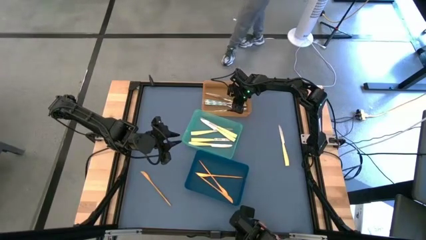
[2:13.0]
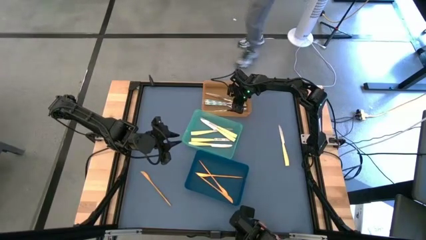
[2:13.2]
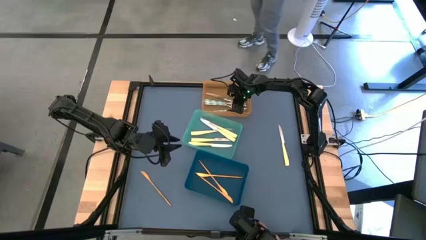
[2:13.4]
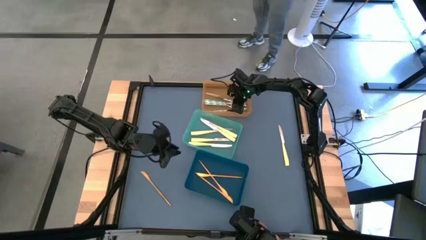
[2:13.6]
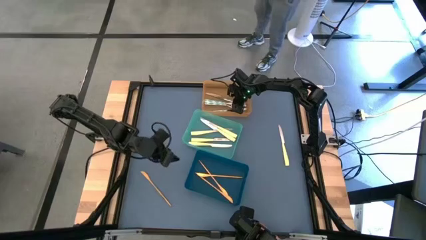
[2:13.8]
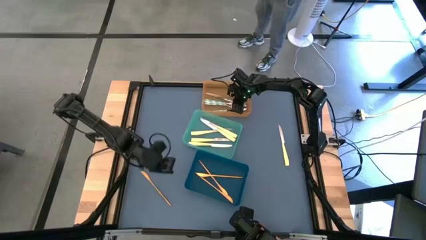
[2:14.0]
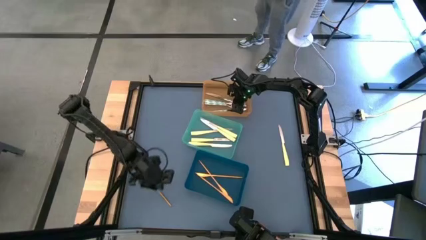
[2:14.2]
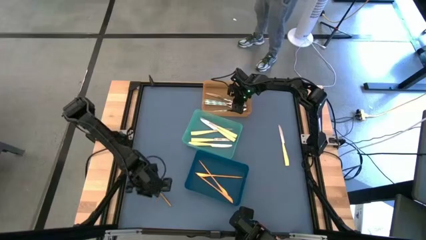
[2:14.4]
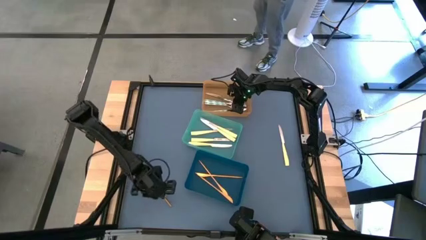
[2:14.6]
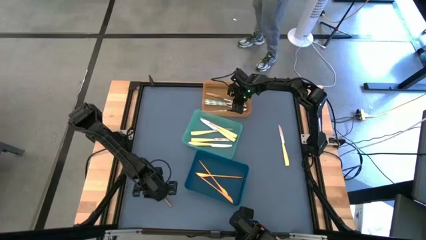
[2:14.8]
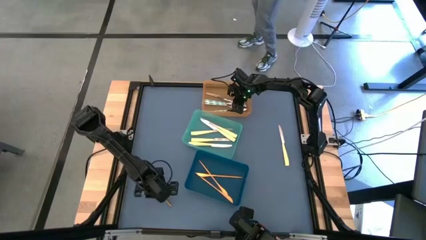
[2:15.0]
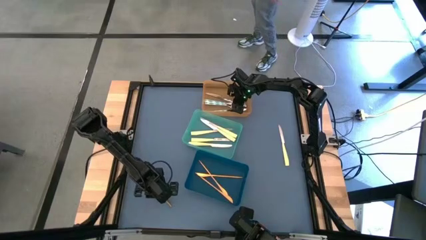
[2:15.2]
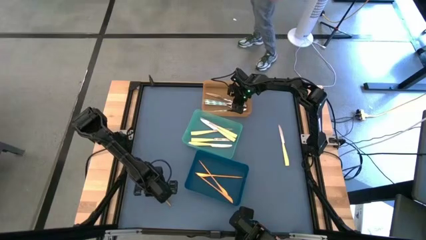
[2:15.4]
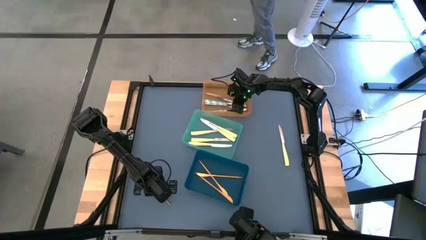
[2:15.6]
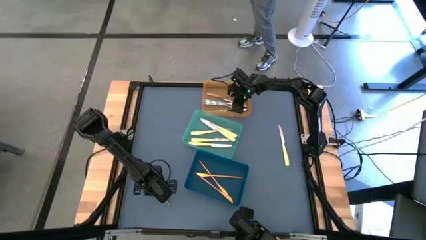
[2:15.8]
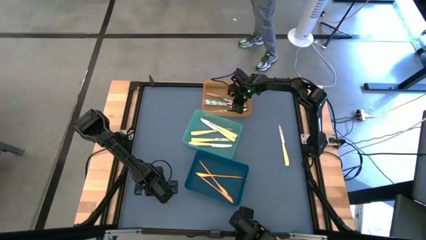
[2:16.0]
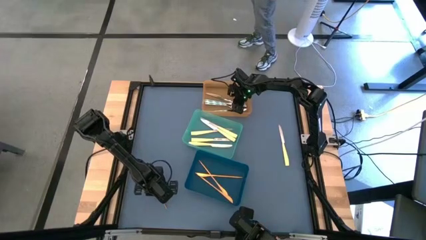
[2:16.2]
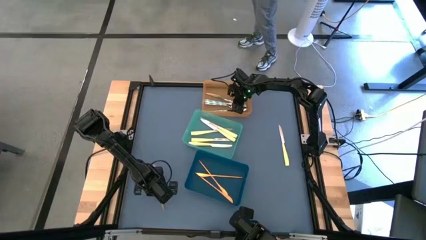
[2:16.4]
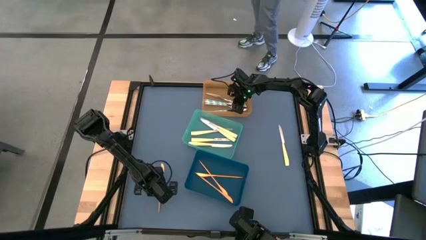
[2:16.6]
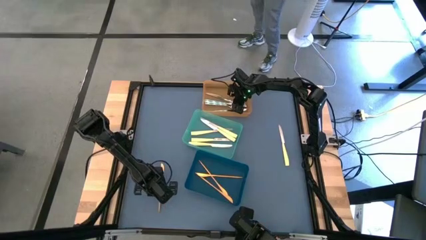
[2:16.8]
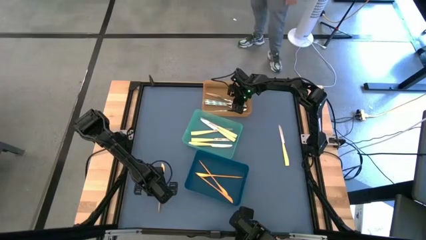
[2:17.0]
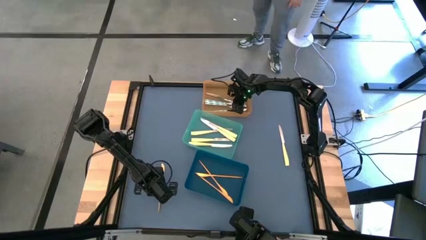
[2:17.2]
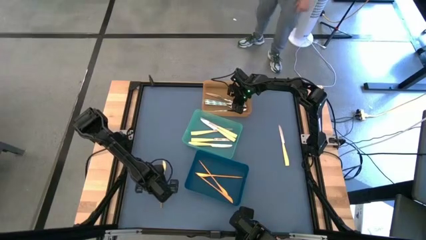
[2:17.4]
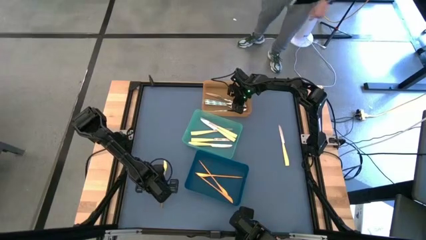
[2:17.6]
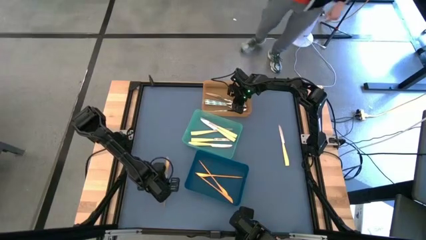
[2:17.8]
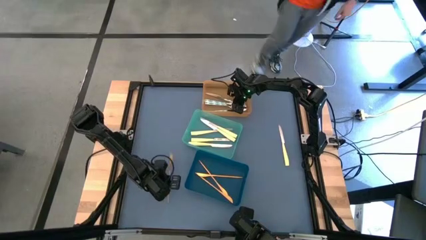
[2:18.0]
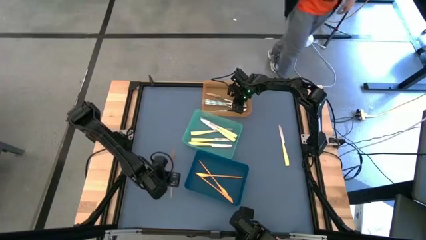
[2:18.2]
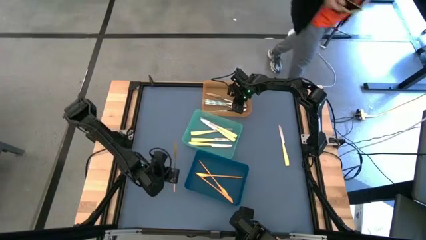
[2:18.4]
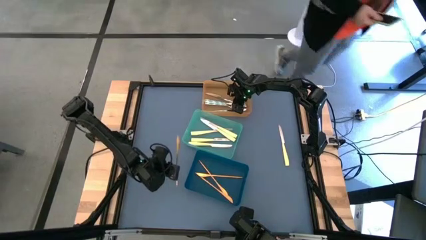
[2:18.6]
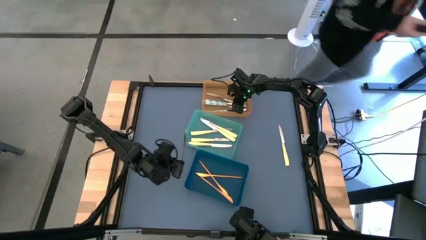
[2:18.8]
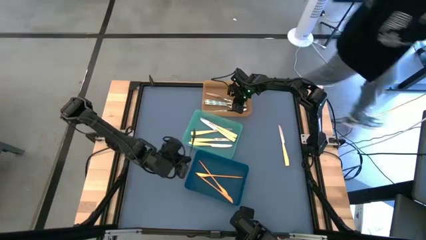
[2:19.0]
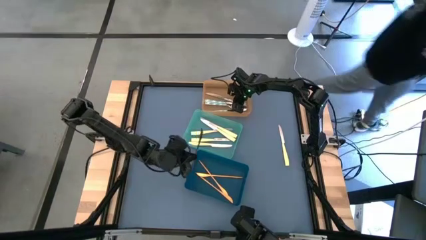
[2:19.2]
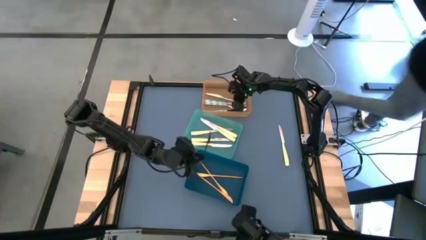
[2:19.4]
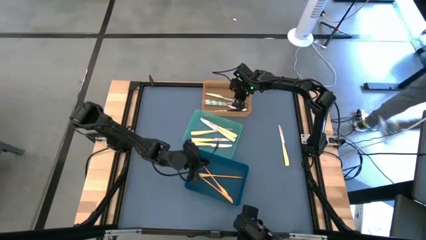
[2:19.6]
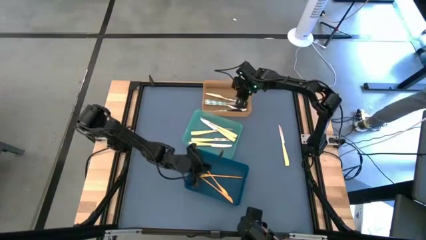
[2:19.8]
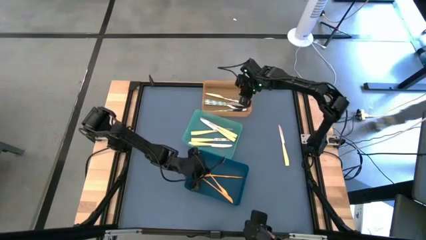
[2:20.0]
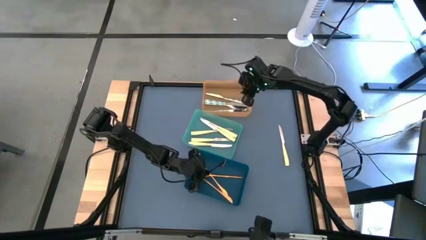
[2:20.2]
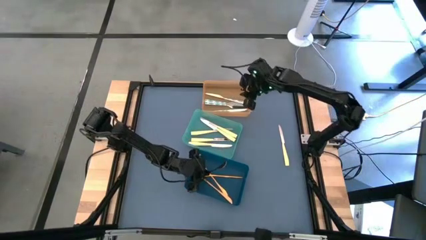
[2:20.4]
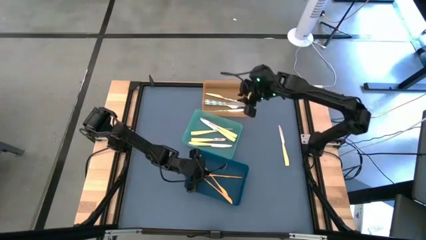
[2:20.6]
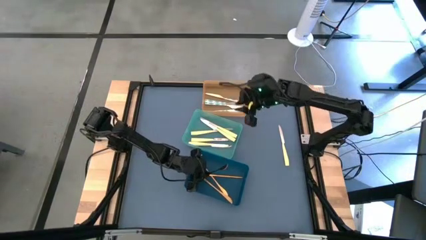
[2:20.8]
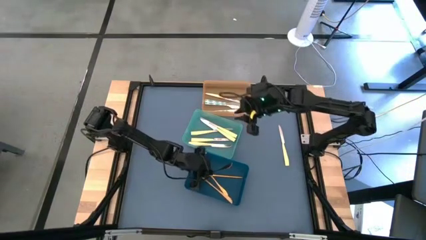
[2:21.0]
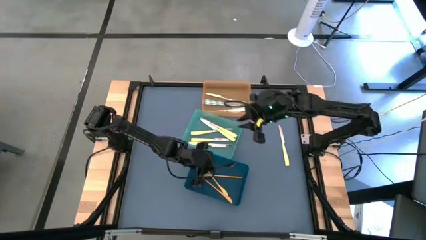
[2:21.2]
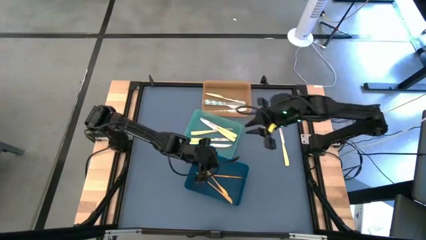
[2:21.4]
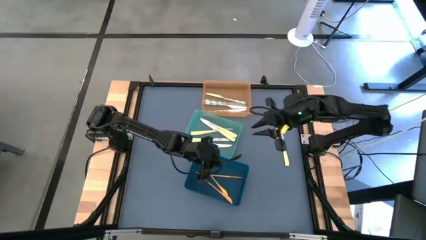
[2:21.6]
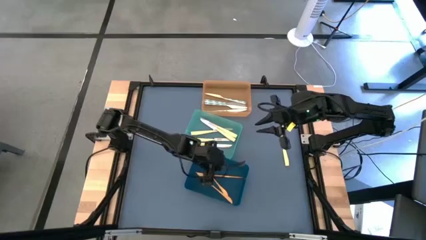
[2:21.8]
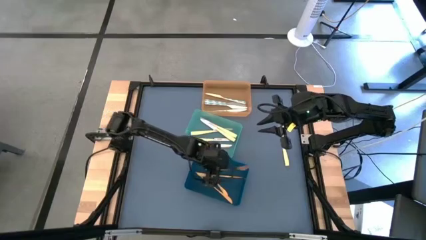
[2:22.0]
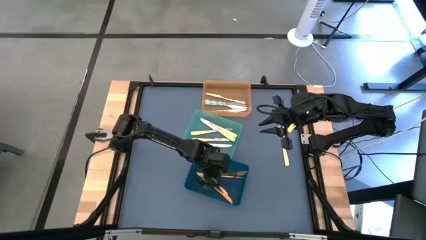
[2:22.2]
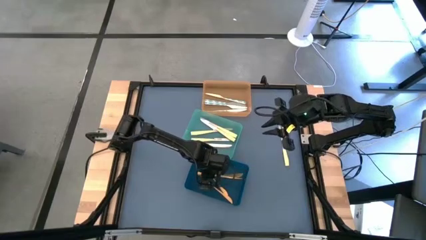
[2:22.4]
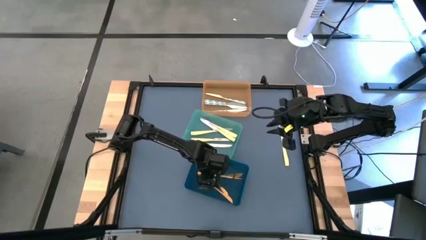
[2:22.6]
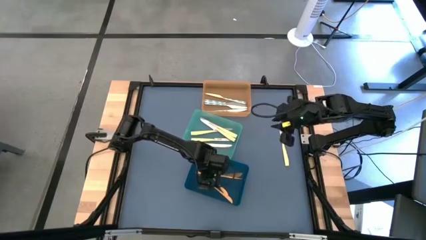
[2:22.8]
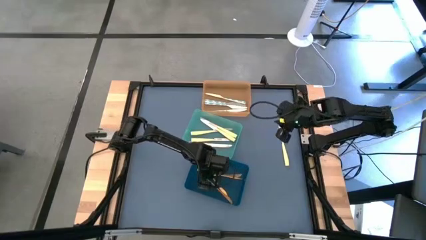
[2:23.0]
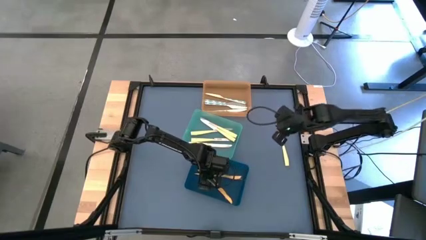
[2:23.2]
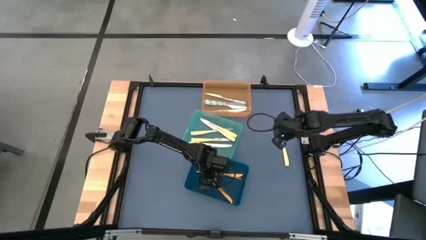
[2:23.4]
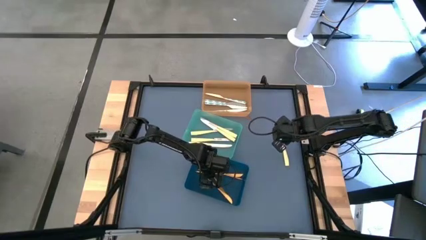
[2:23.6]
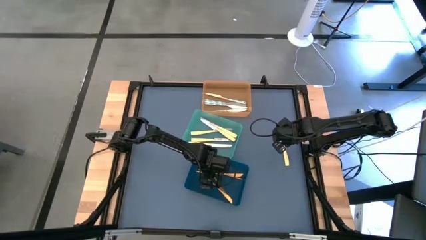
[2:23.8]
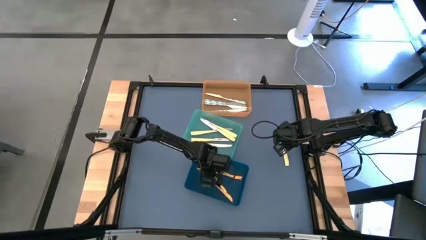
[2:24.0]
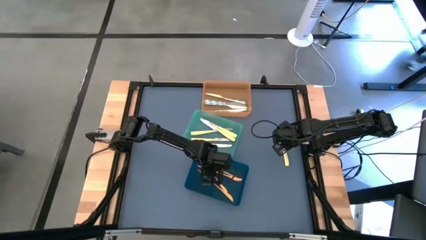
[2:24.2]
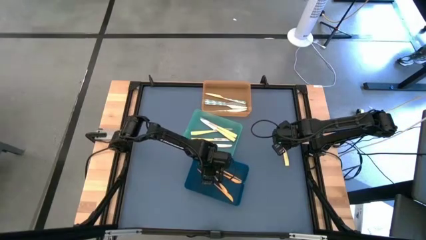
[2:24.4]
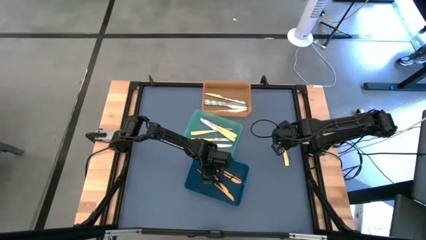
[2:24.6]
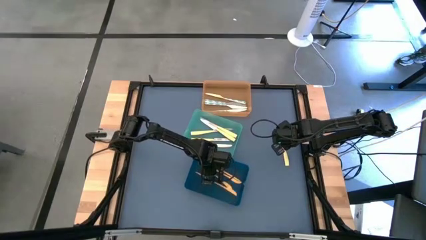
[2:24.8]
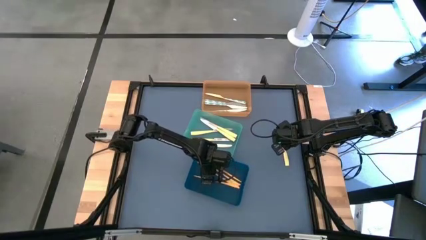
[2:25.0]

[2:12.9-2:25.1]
Task: Sort silverware by color (type)
Put the golden knife into the blue bin

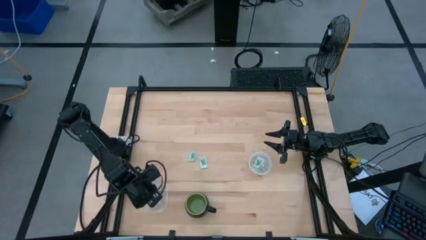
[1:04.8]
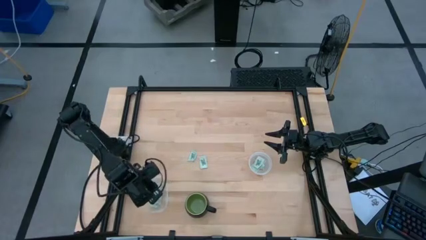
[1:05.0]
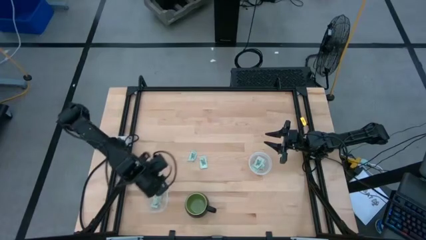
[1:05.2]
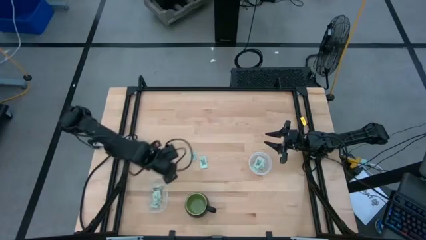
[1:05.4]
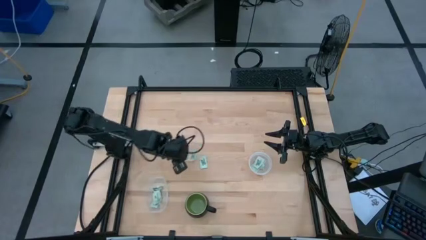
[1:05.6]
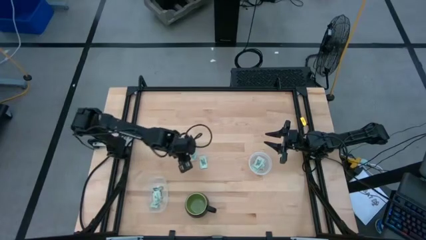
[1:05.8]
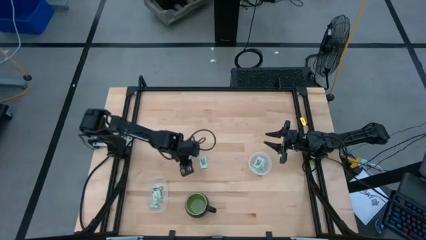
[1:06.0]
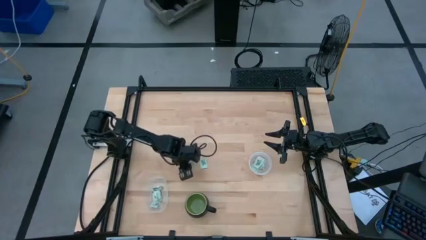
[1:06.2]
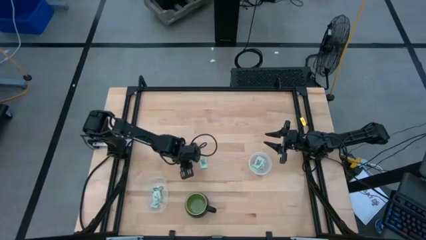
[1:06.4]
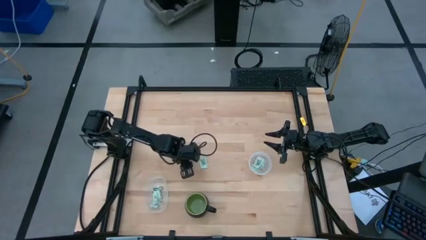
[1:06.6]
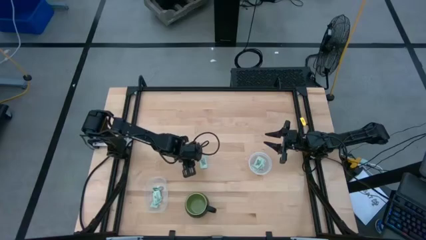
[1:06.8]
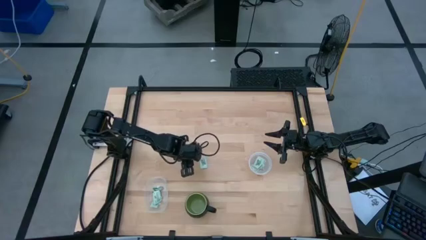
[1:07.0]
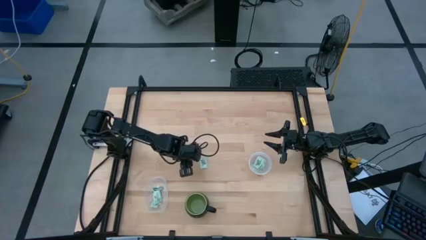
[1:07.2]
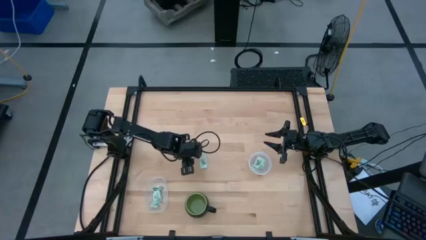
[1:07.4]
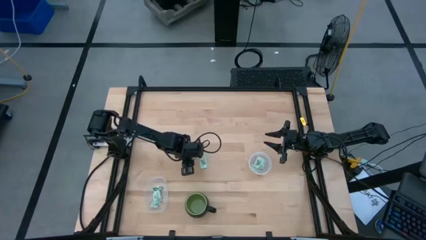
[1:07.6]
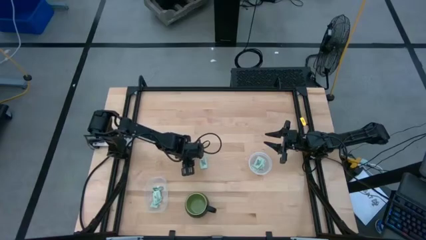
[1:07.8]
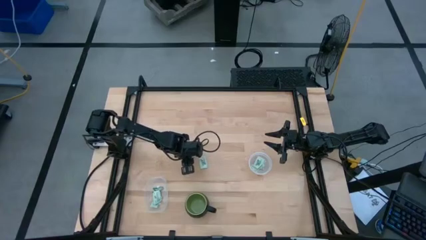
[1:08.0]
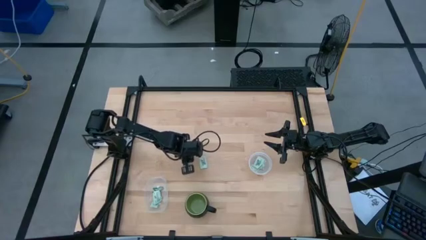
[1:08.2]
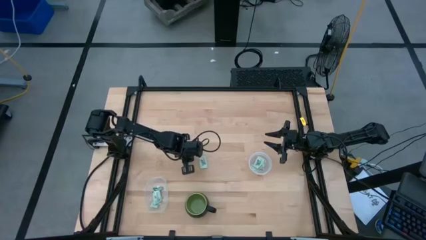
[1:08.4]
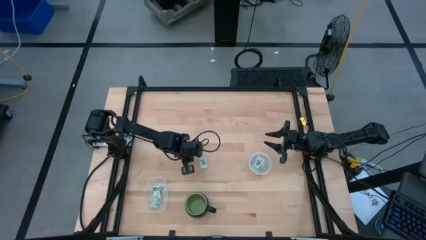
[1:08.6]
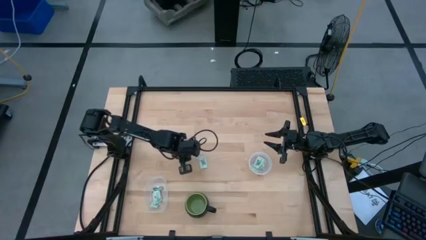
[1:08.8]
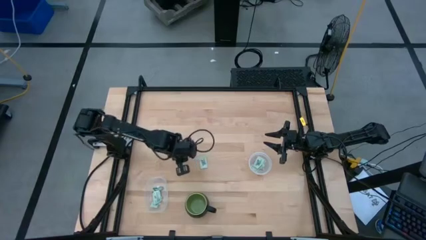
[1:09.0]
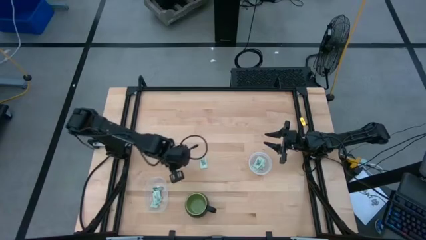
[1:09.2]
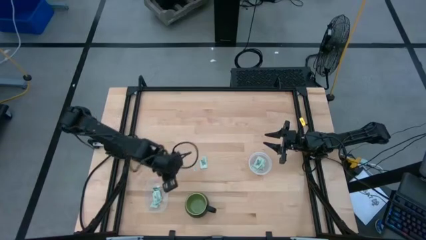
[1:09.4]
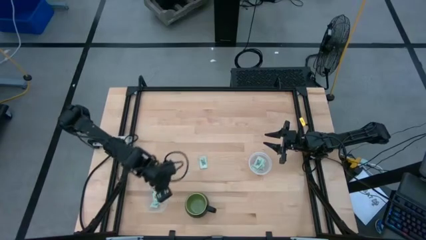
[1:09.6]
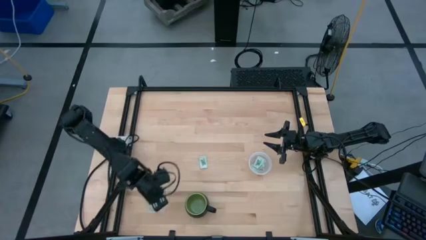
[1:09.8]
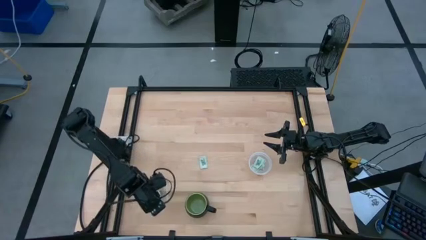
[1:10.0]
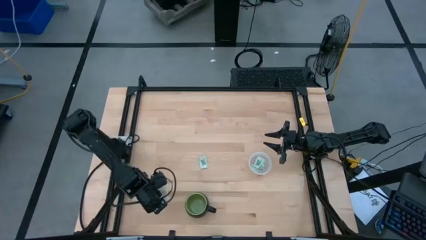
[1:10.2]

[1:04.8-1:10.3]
Task: Pick and place Stevia / Truvia into bins
Put the white stevia packet into the rectangular transparent container
